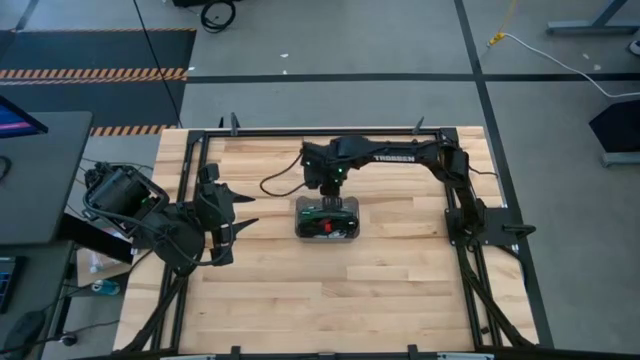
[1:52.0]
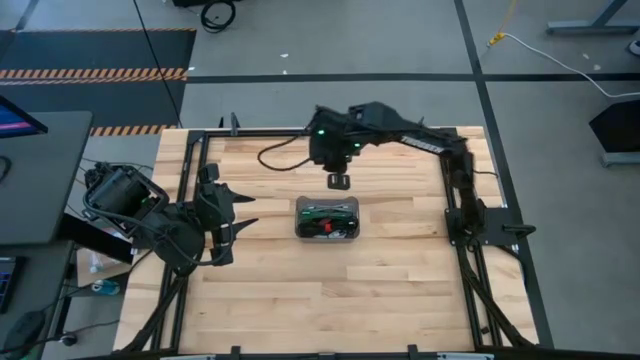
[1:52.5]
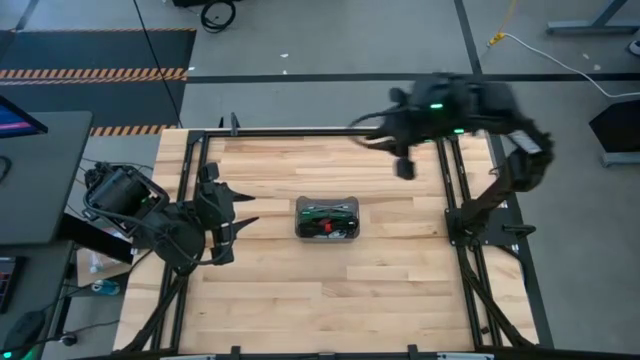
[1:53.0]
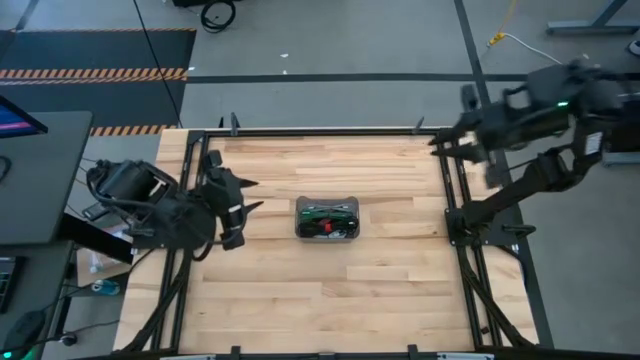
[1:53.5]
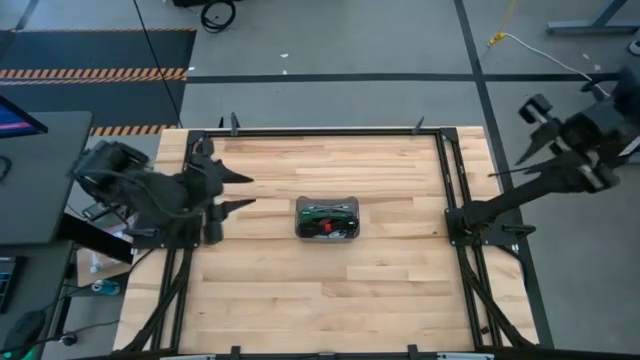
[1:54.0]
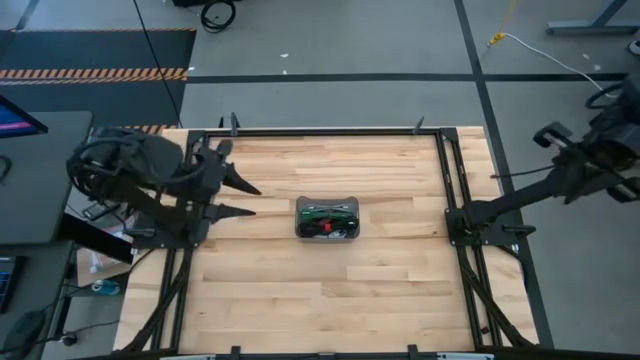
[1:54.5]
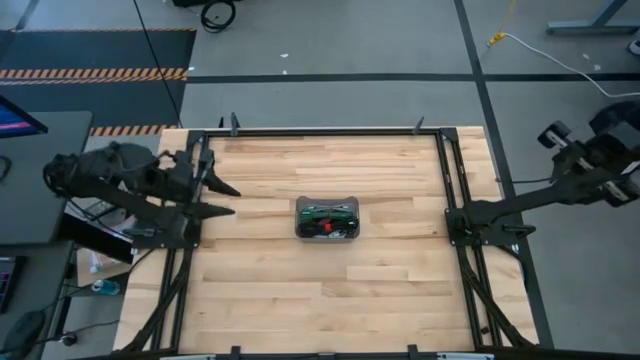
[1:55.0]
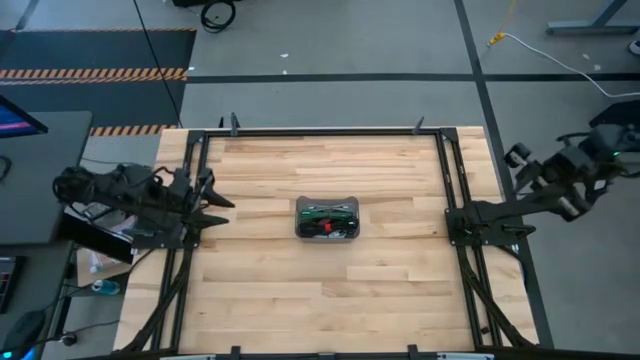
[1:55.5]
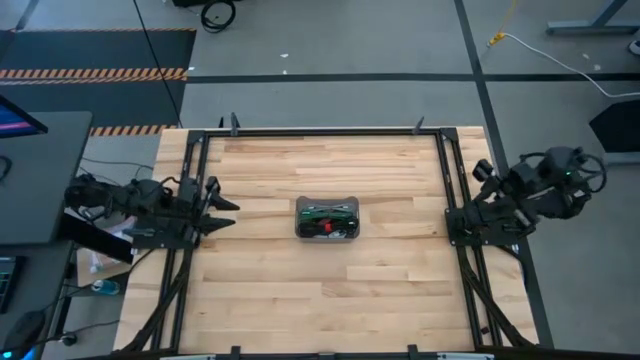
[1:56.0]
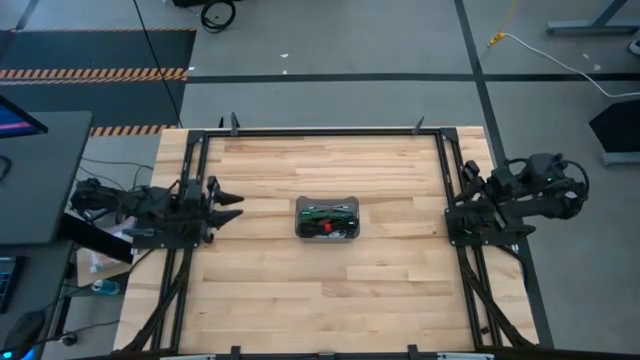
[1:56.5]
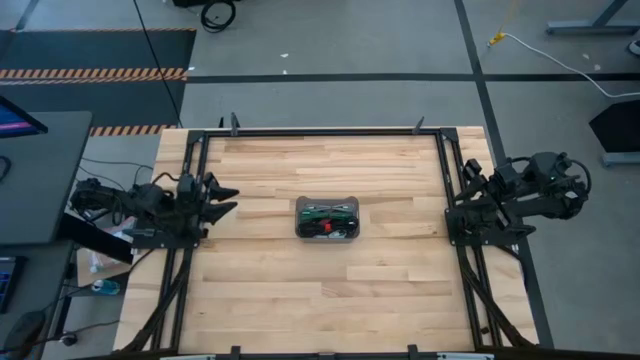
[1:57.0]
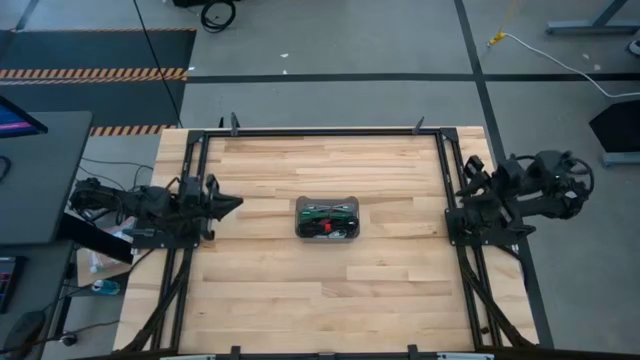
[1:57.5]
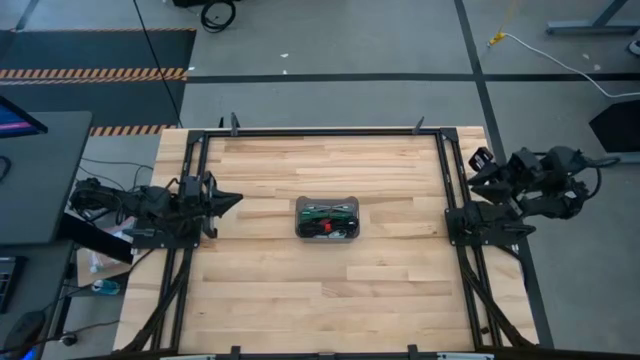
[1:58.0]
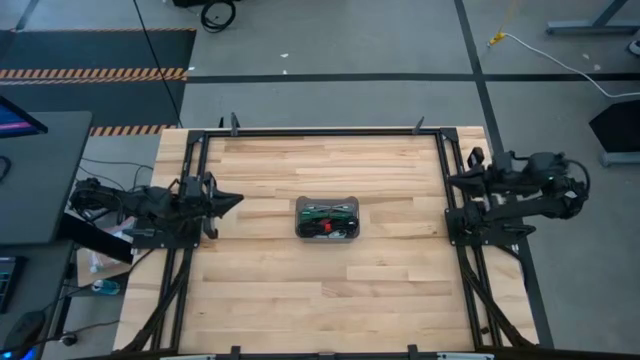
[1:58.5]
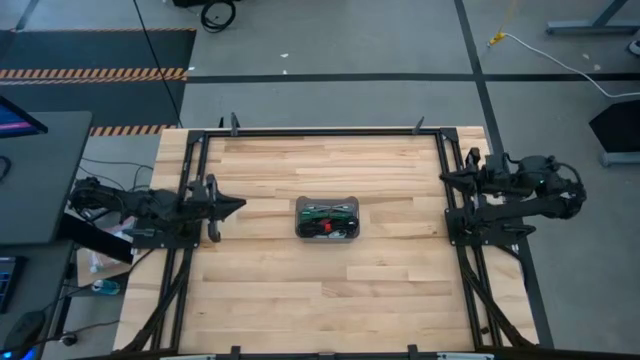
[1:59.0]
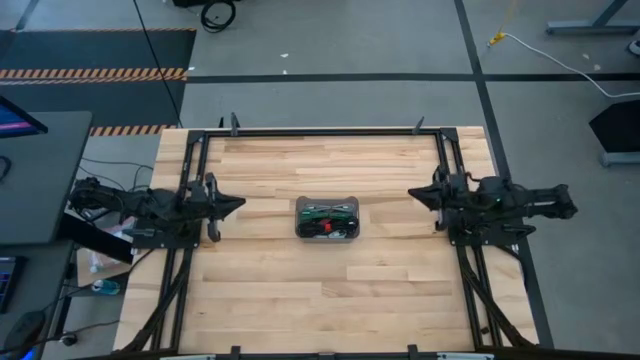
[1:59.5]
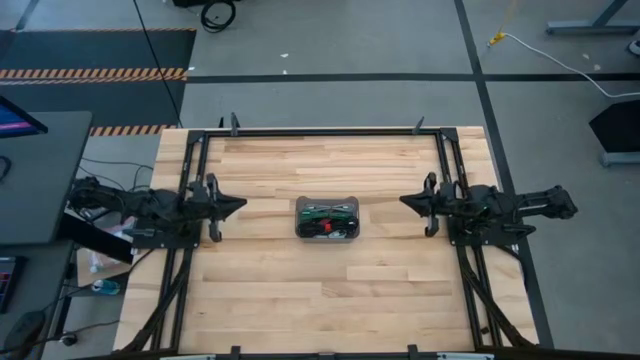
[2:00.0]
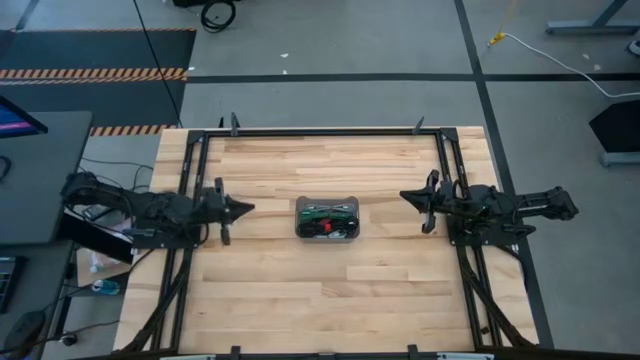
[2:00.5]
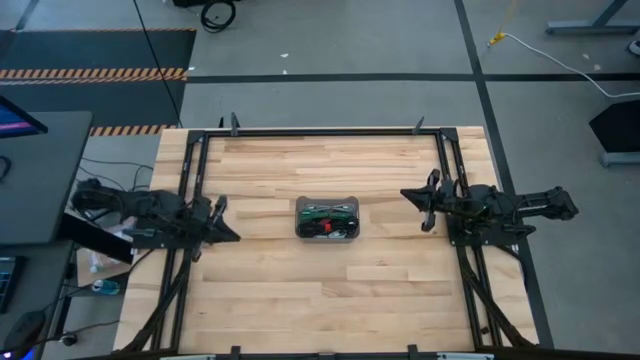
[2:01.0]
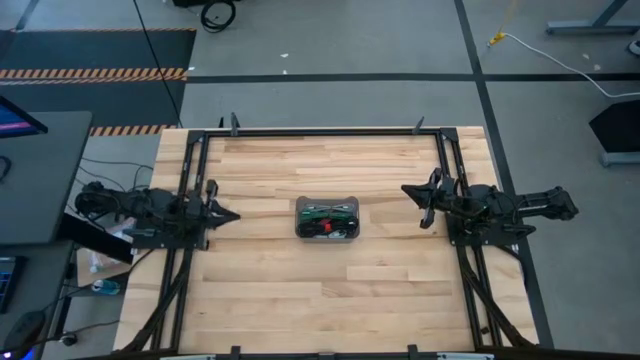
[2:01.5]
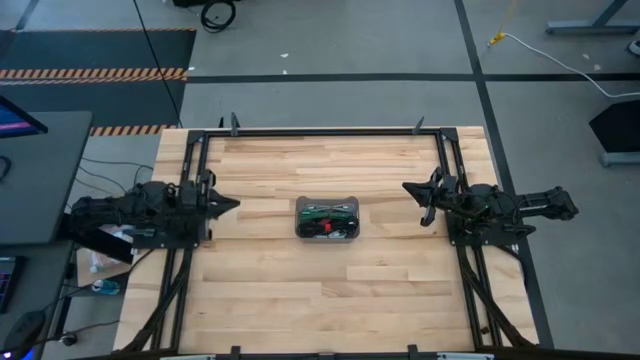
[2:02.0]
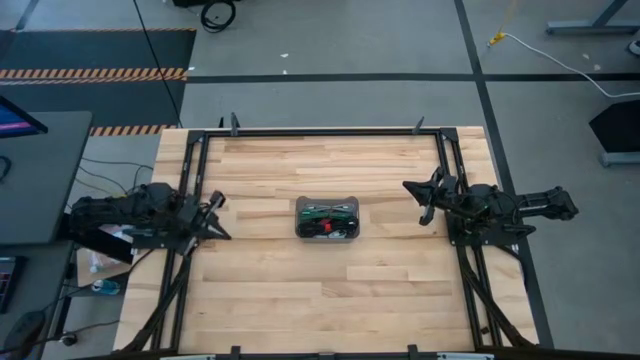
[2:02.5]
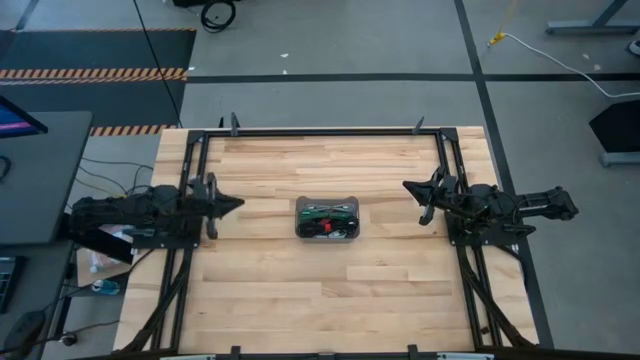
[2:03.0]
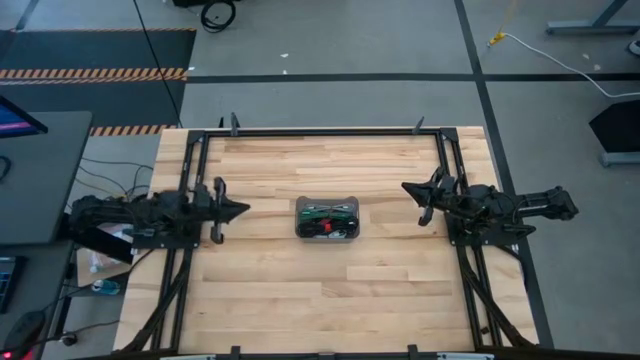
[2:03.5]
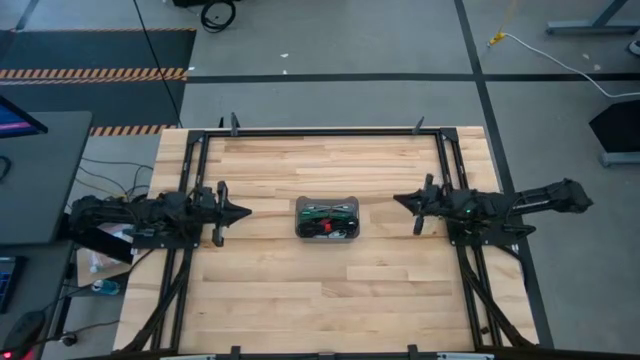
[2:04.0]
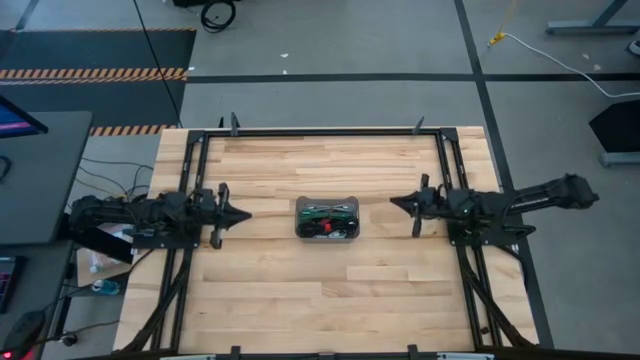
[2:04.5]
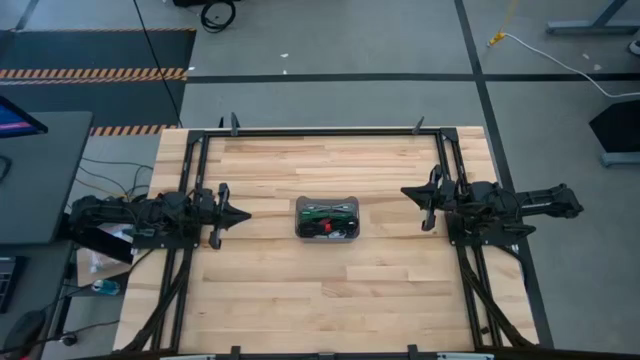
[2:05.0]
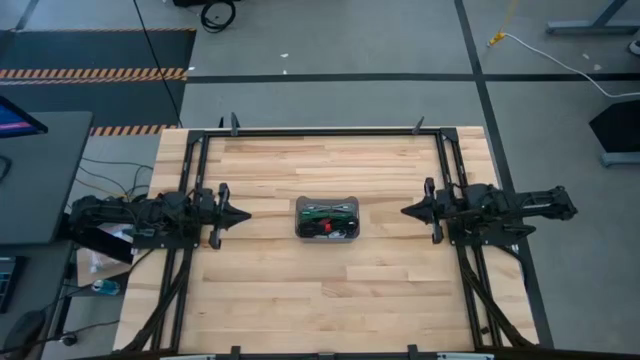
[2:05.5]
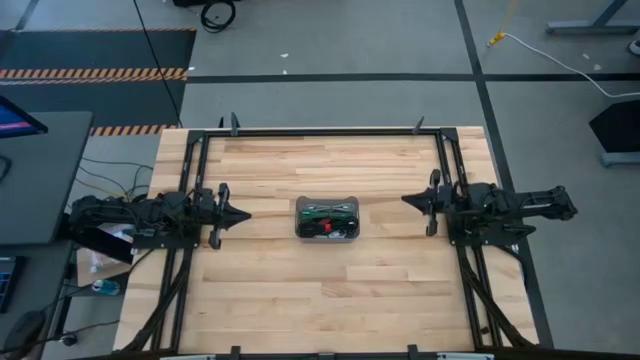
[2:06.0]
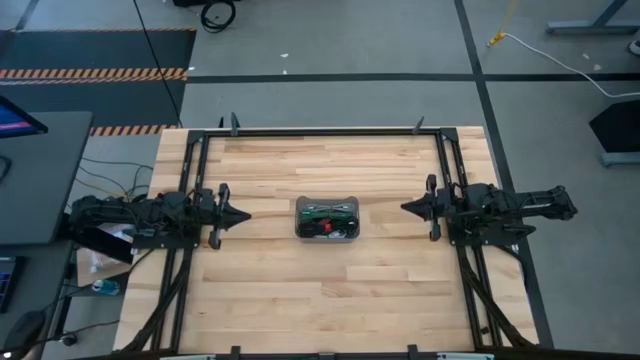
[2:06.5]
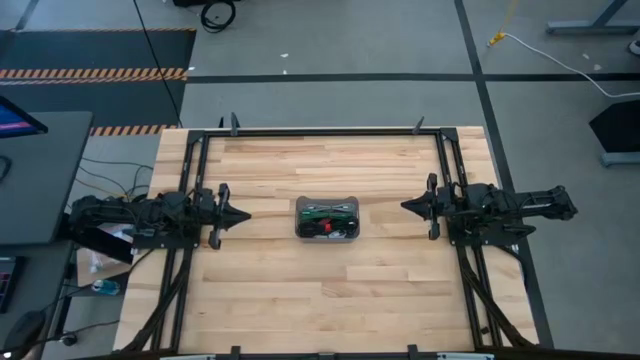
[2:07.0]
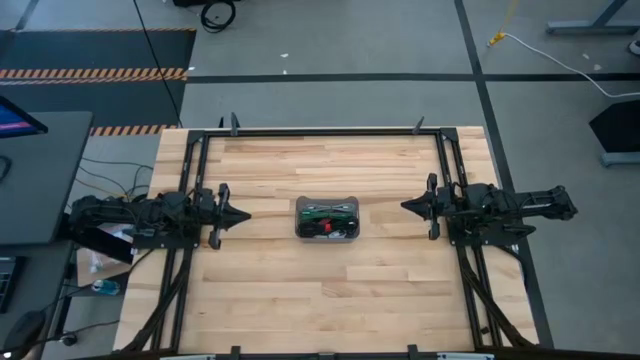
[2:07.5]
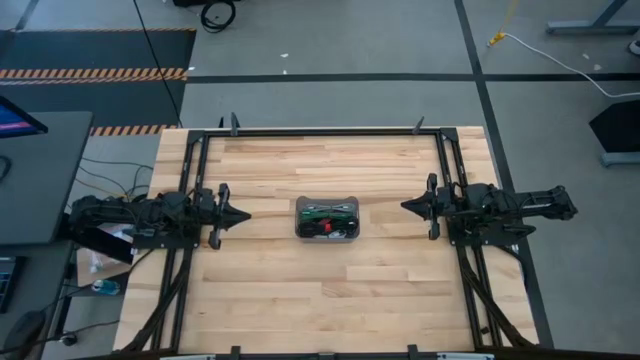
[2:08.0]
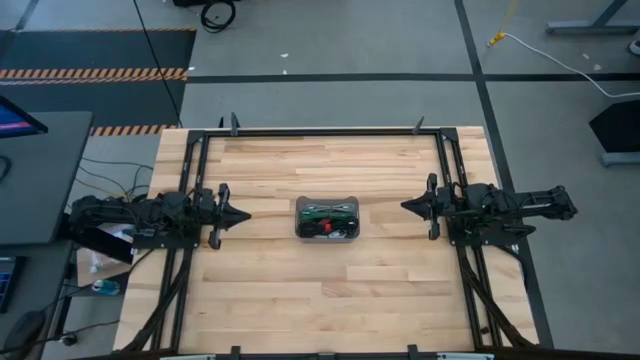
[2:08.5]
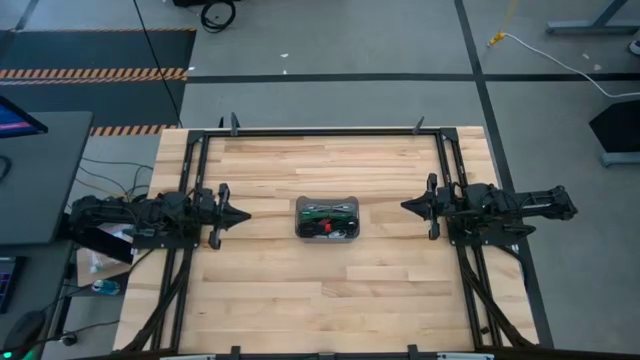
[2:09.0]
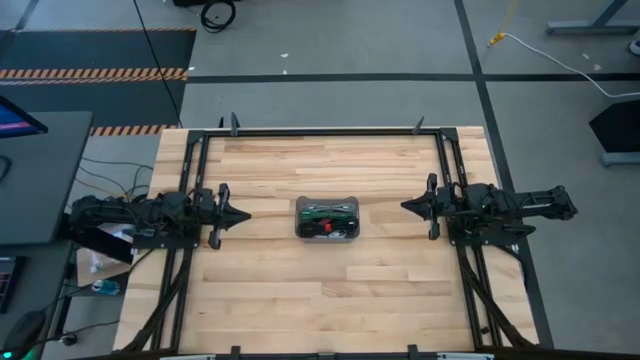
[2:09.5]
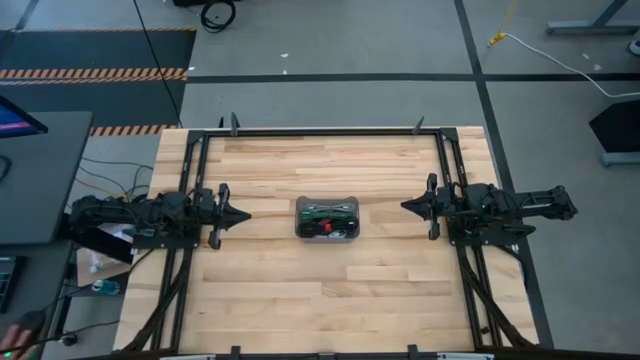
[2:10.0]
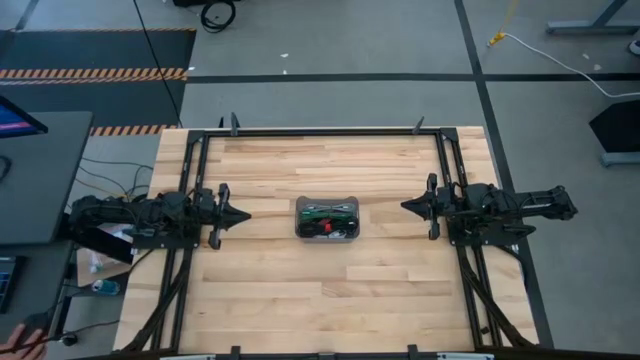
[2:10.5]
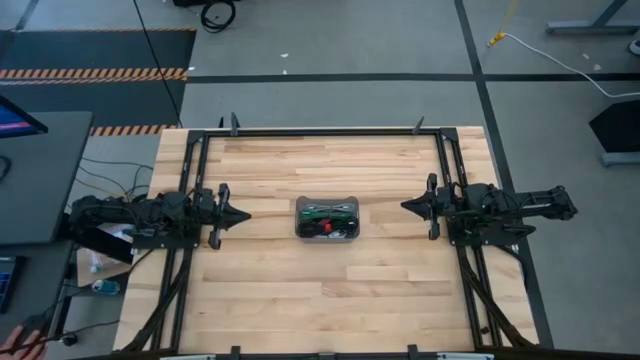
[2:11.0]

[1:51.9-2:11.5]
Task: Pick and place USB-C Cables
Return to Home Position

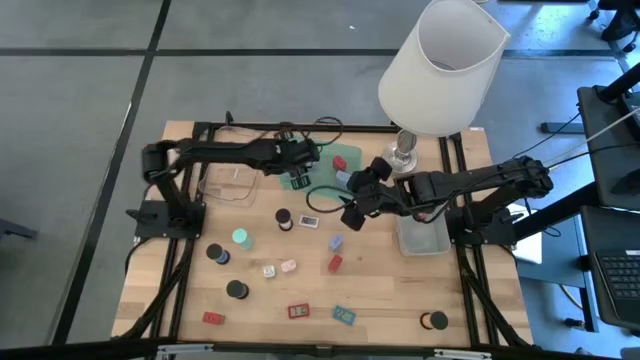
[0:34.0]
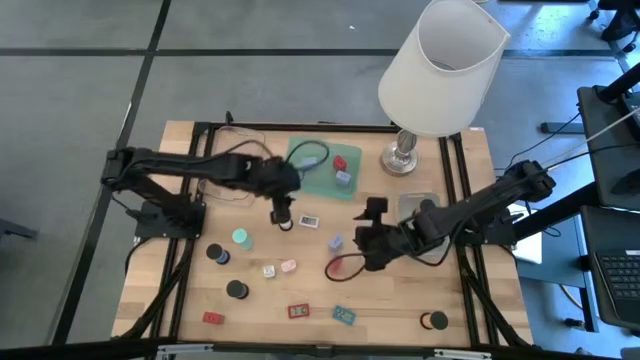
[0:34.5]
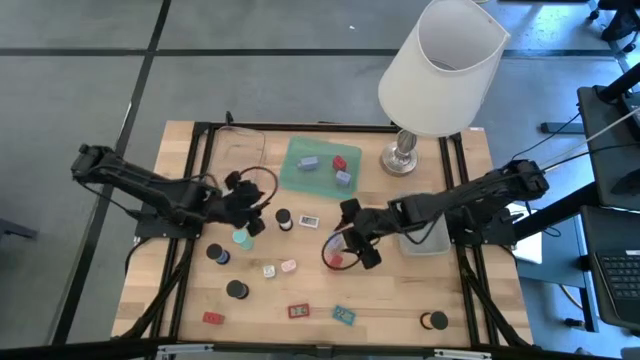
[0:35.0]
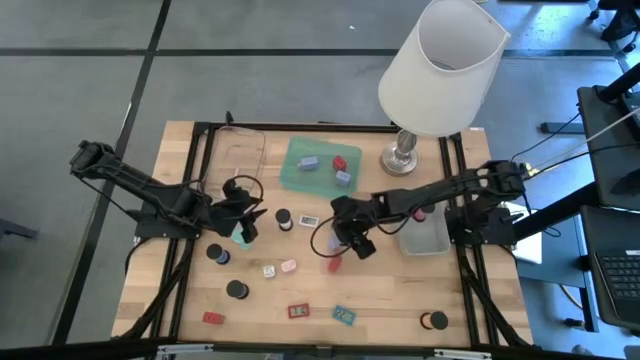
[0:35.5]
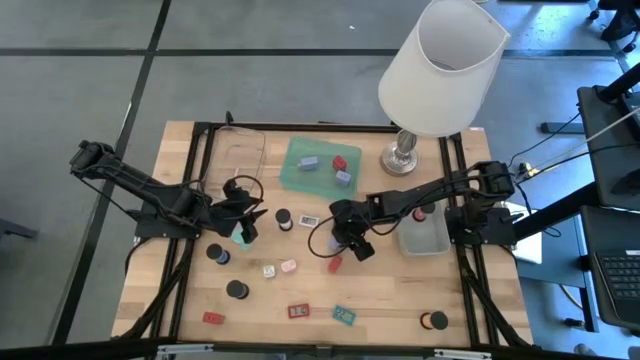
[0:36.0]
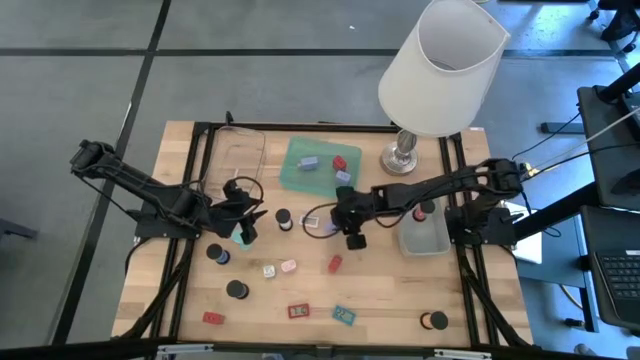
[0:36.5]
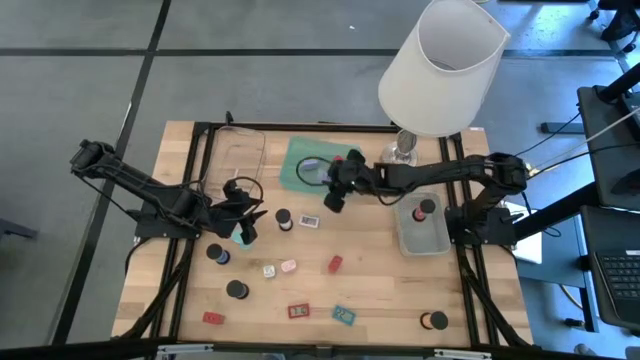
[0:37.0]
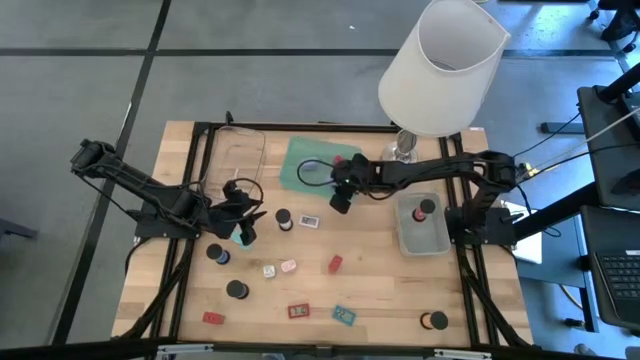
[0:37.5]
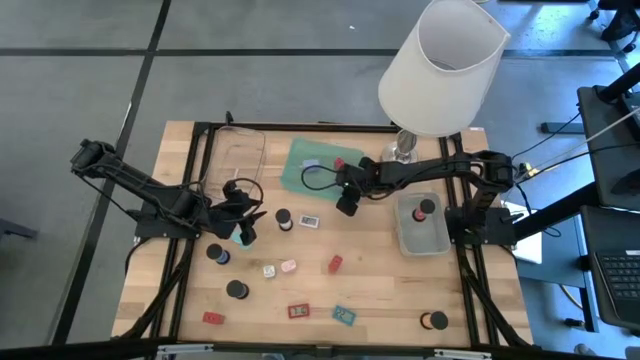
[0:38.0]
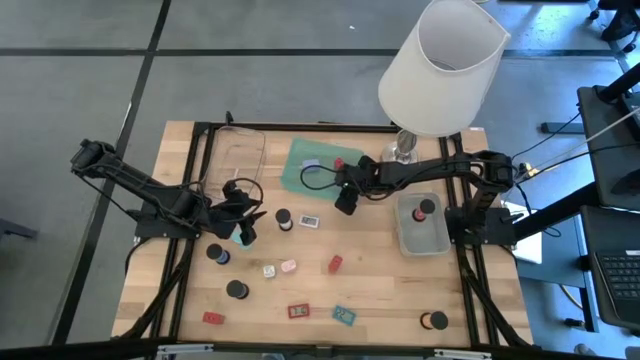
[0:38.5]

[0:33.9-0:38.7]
Task: Pick & Place Office items
Put the blue charger adapter into the green bin
